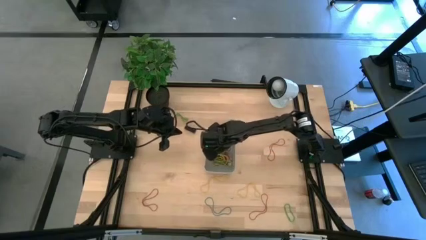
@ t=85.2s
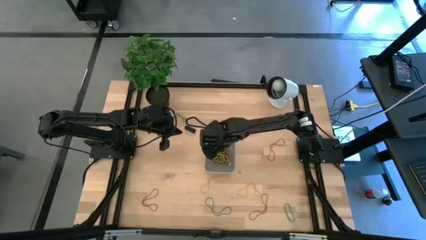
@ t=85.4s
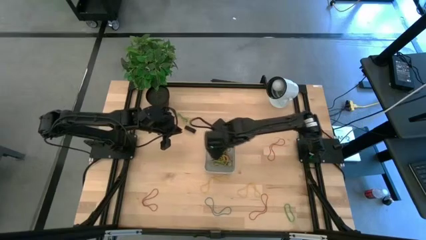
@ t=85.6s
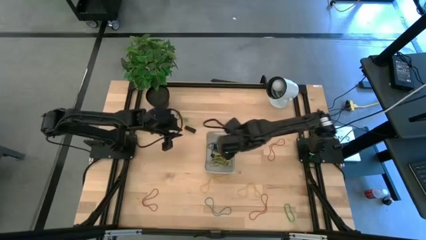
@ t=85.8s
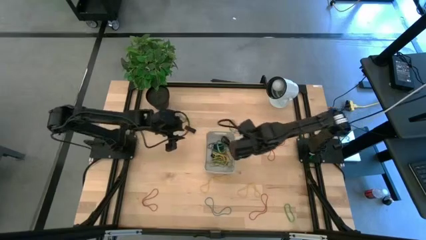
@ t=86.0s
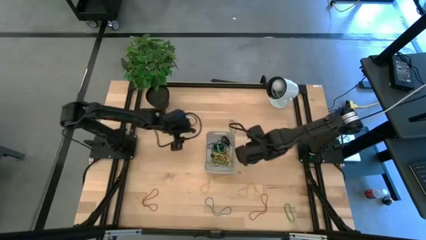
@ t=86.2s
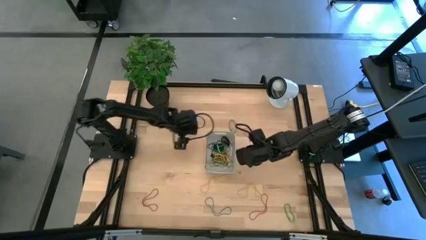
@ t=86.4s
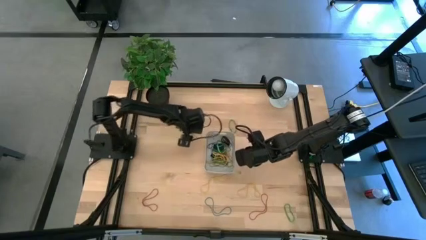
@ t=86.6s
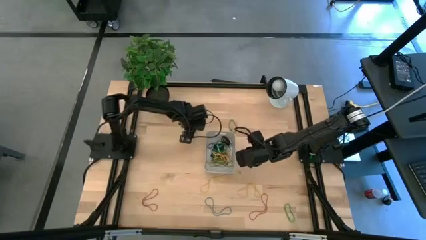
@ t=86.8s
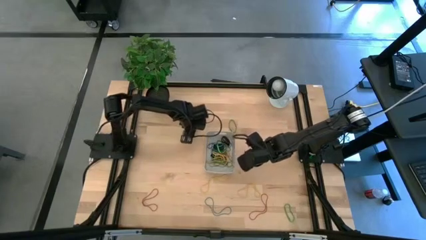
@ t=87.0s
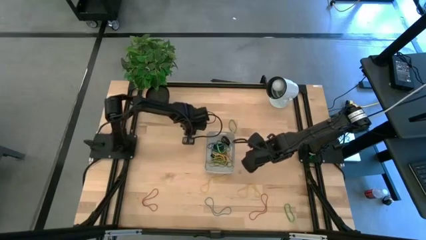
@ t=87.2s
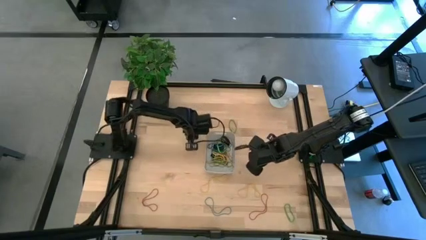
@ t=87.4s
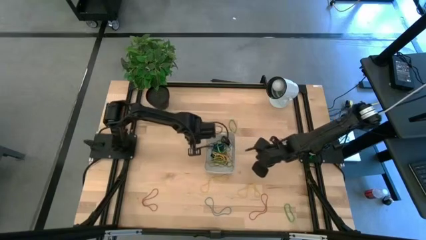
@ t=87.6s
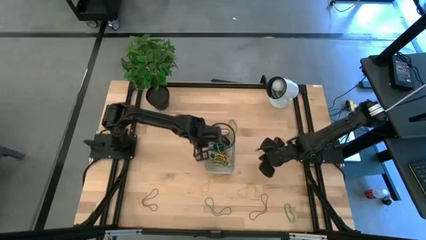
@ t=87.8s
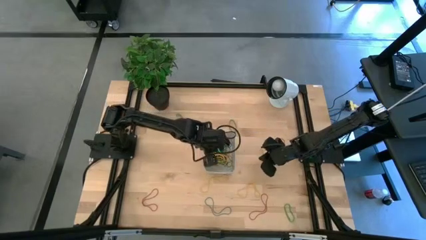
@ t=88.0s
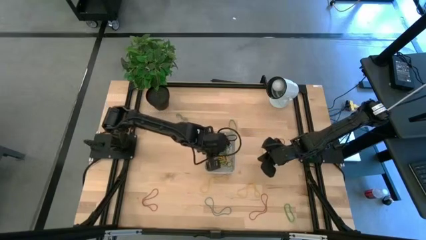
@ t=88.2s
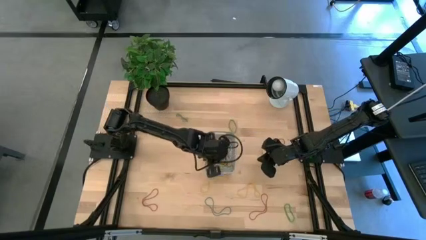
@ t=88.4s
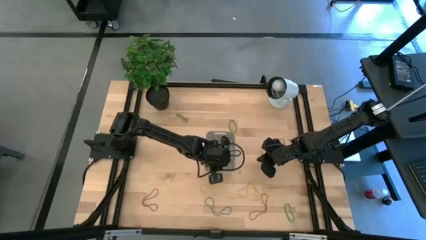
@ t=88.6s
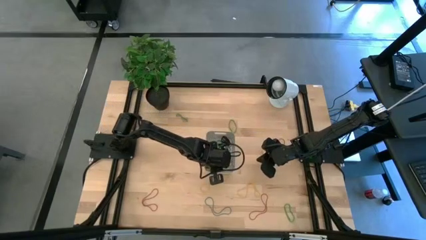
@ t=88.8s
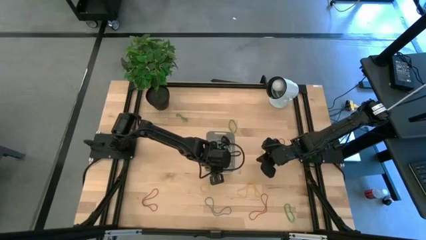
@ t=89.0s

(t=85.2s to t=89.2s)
Task: Pick and place rubber bands into bin
Put the black rubber band into the gray bin

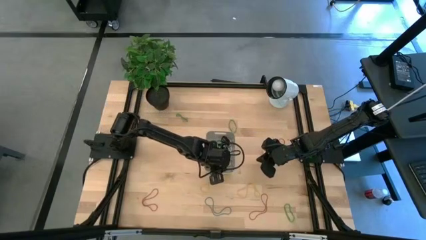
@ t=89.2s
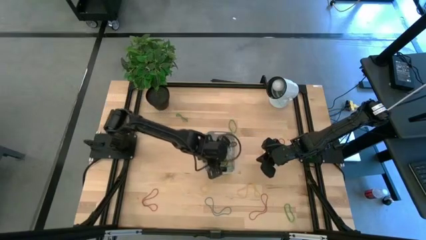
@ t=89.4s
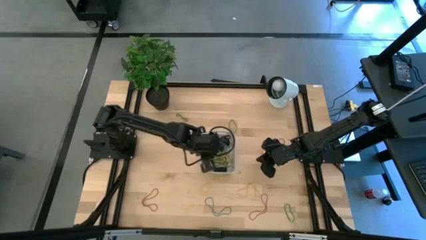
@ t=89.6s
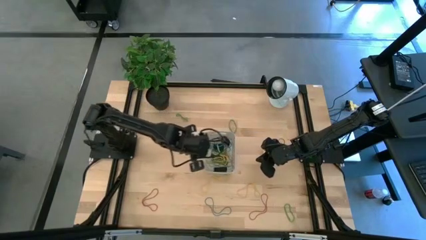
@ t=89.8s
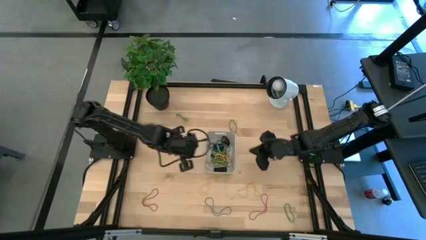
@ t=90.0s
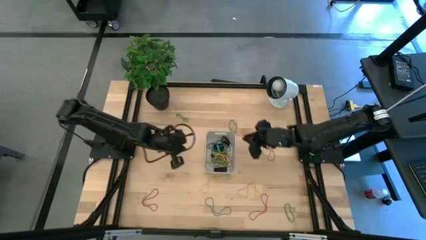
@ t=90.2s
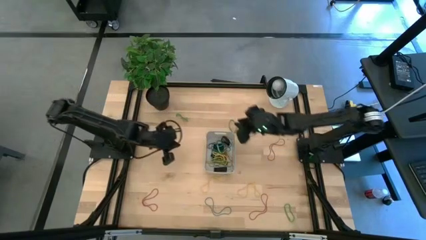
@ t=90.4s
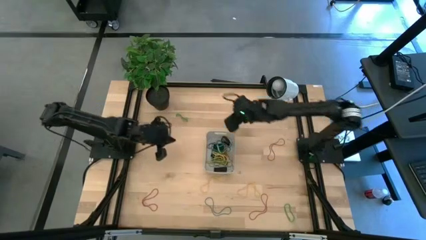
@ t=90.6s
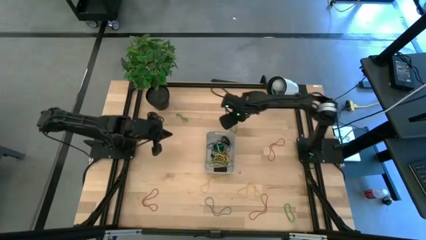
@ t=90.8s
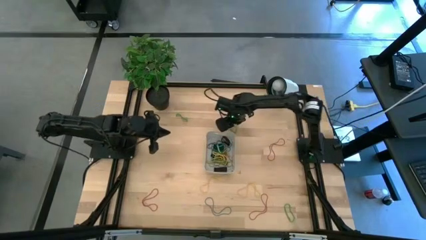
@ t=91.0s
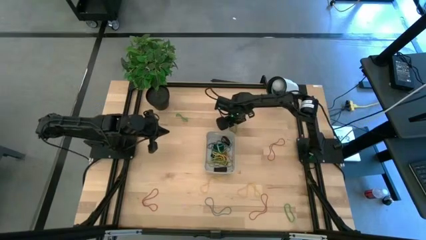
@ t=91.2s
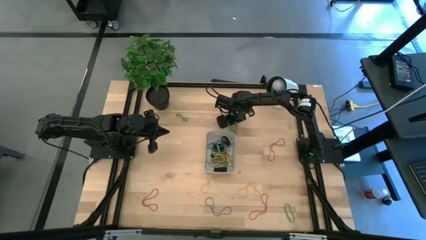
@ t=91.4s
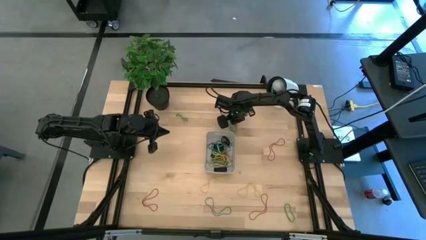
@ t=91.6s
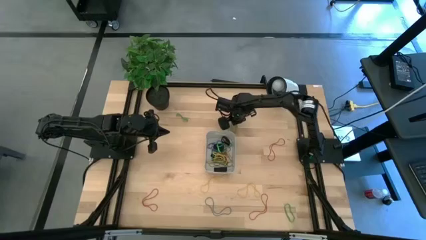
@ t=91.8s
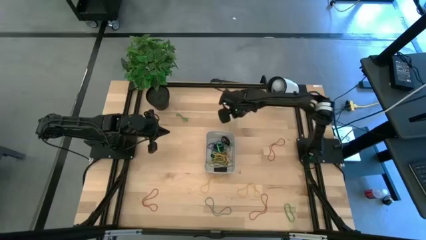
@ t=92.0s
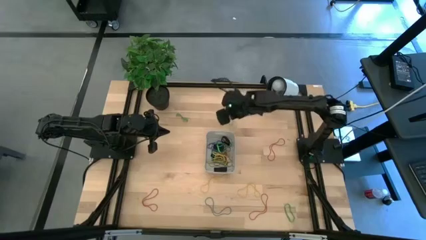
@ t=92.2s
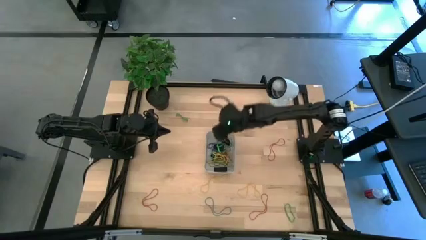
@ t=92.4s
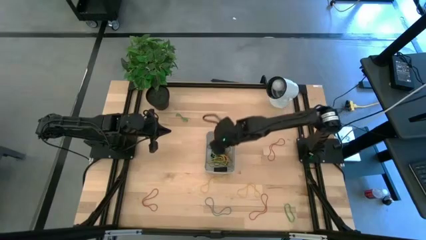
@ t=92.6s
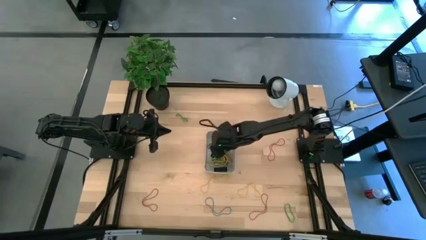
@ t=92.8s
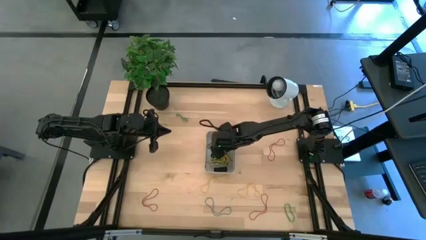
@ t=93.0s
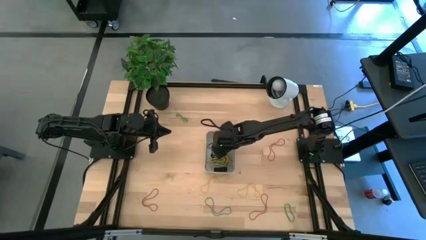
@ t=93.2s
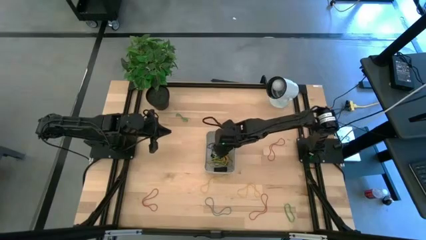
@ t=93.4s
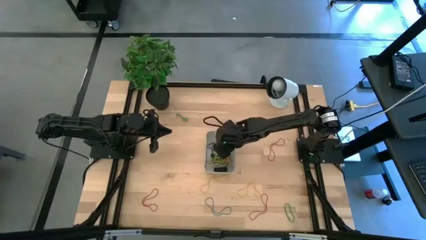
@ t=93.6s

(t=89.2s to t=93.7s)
Put the green rubber band into the gray bin

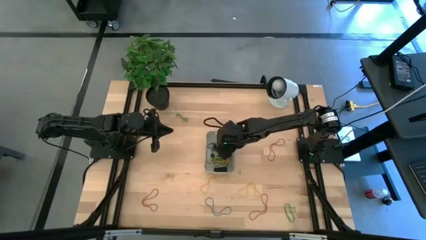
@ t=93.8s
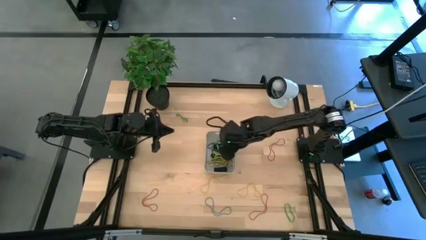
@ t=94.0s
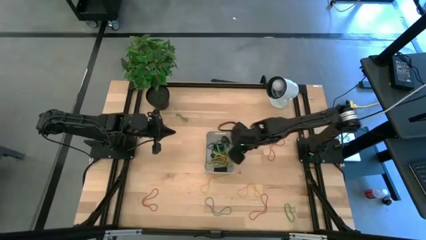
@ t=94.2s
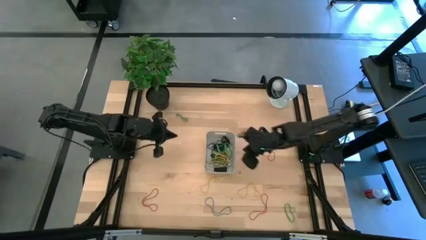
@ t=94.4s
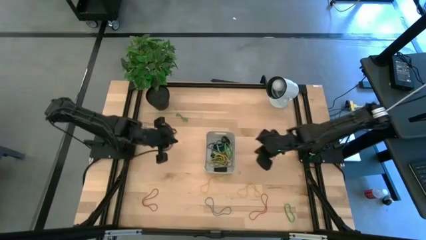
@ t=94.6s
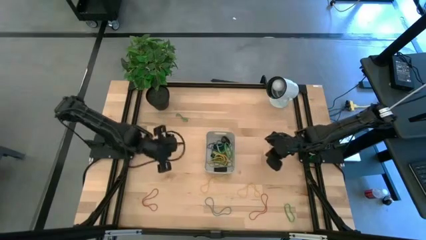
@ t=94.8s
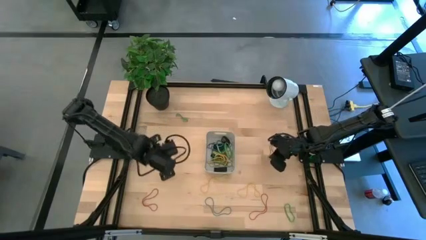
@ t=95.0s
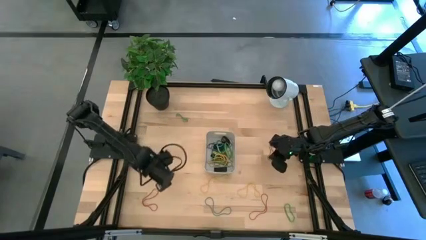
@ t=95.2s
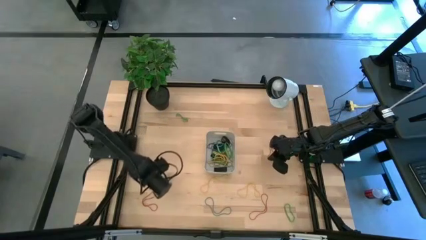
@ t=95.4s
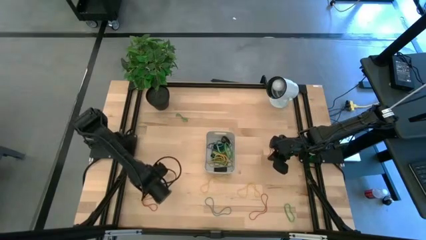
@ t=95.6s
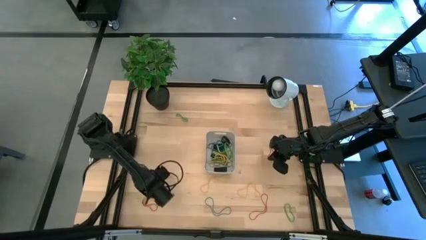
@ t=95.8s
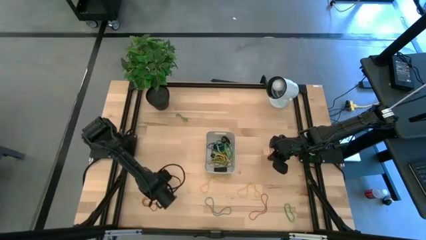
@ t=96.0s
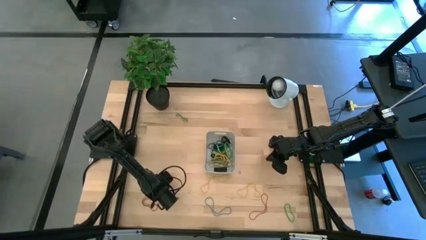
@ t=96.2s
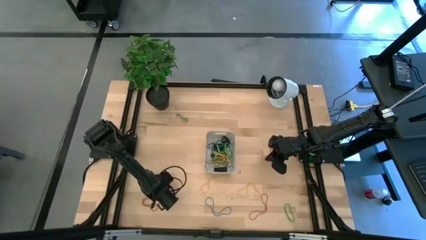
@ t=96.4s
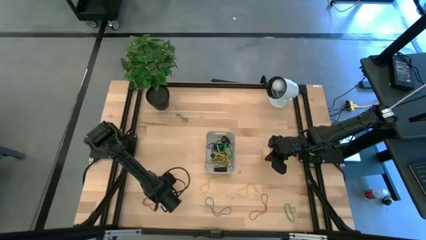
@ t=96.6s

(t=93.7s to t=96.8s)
Put the red rubber band into the gray bin

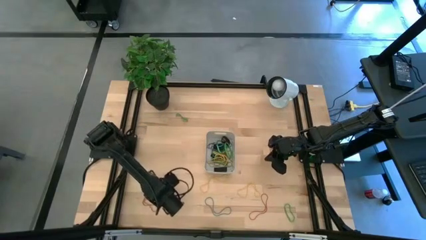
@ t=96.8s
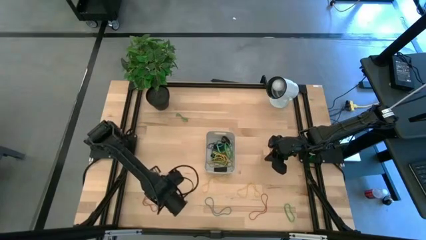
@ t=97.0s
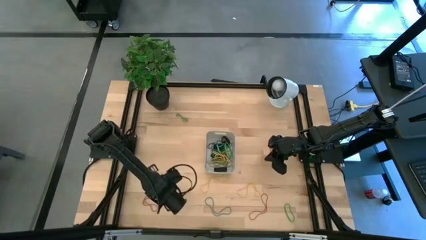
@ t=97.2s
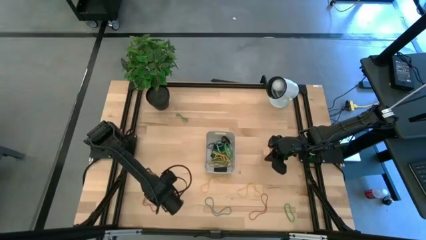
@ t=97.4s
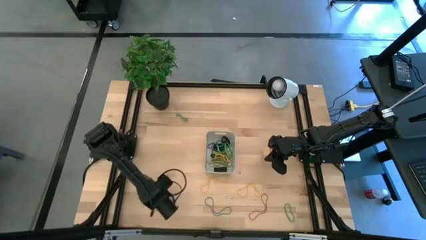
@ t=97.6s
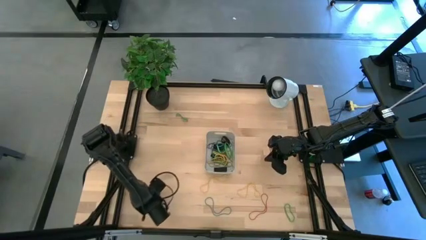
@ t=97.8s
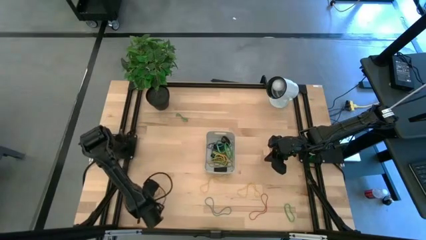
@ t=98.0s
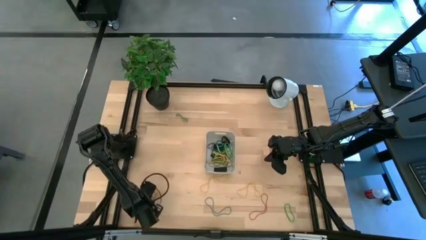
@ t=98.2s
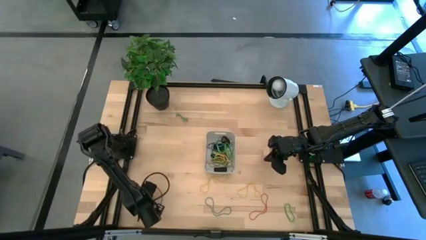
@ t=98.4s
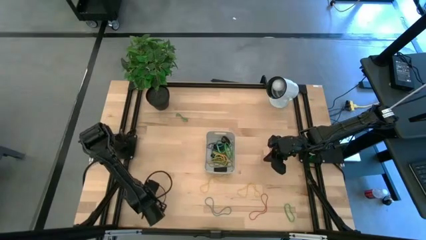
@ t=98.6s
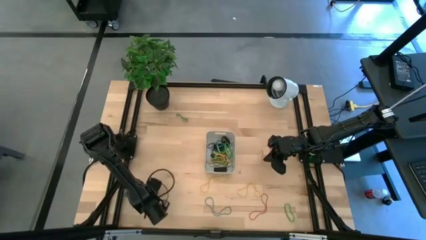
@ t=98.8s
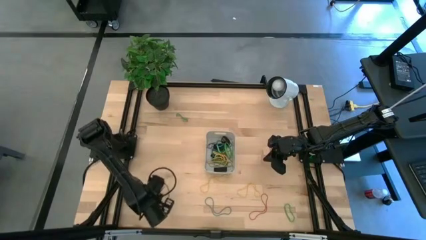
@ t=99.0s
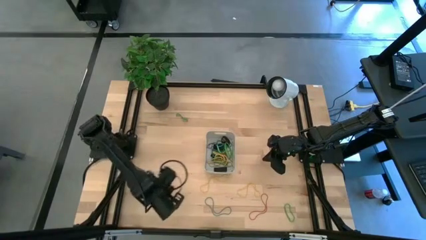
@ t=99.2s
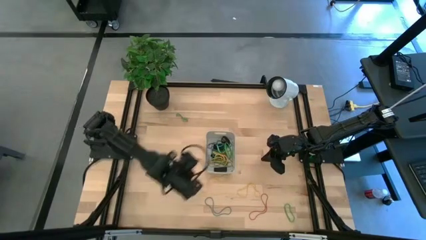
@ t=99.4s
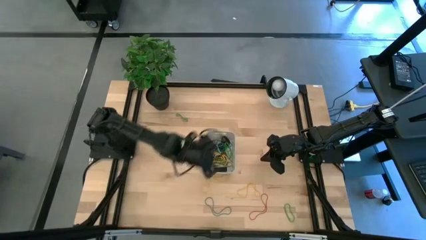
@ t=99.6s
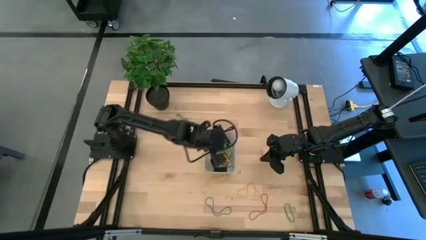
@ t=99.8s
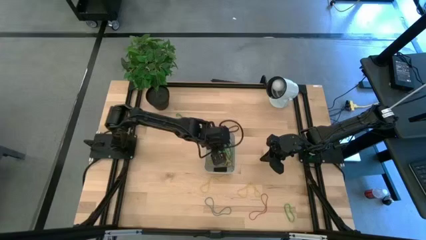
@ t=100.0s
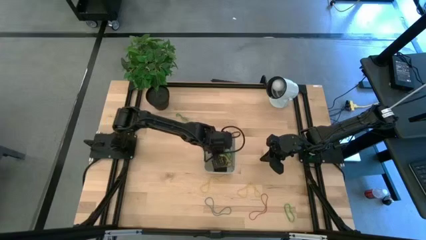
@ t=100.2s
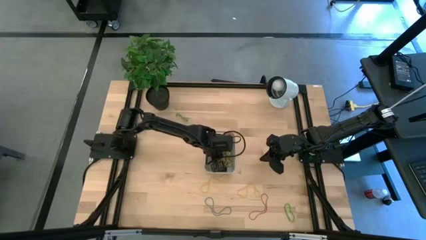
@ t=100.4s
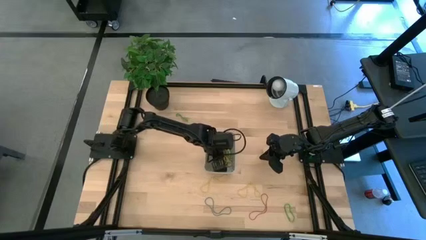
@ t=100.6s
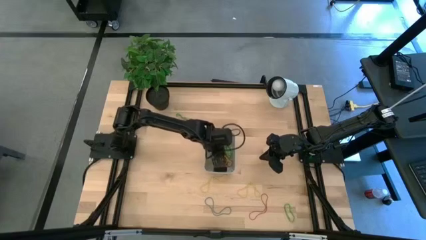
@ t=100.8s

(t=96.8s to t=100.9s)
Put the red rubber band into the gray bin

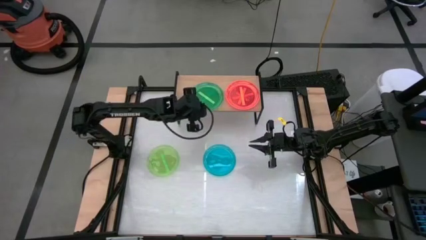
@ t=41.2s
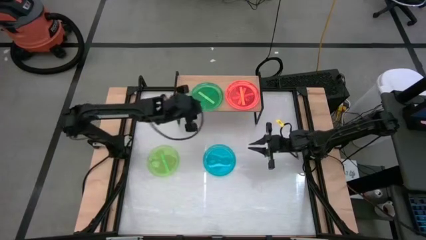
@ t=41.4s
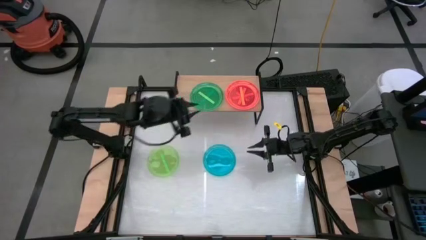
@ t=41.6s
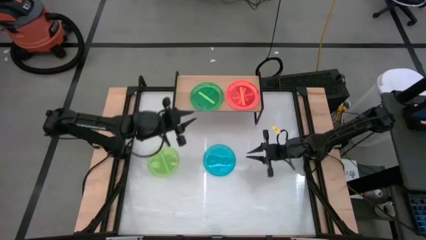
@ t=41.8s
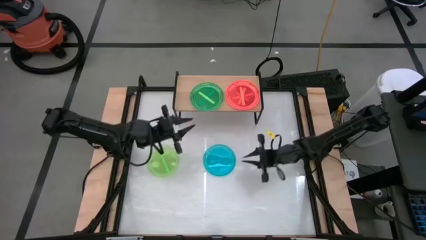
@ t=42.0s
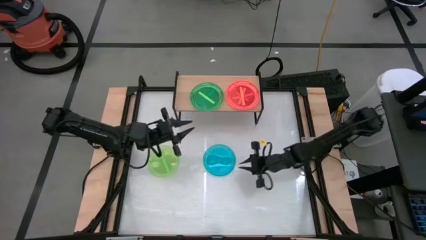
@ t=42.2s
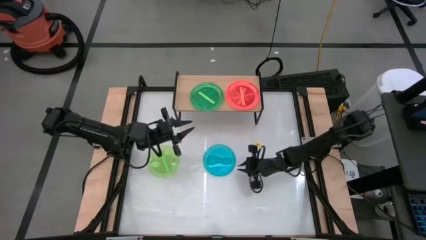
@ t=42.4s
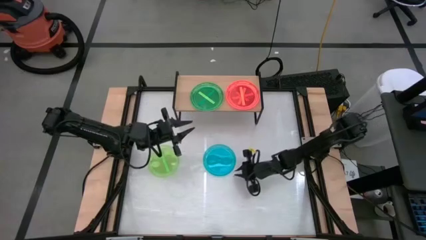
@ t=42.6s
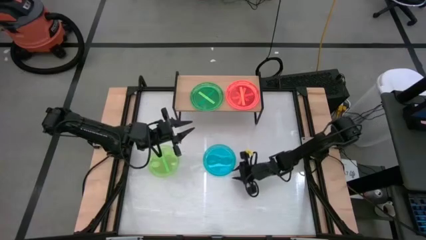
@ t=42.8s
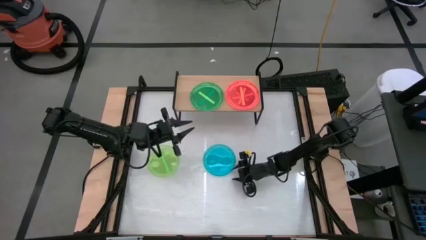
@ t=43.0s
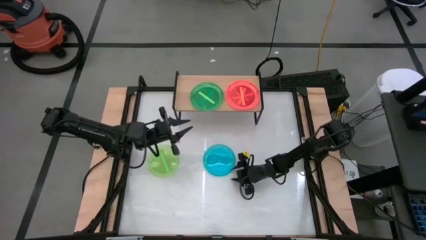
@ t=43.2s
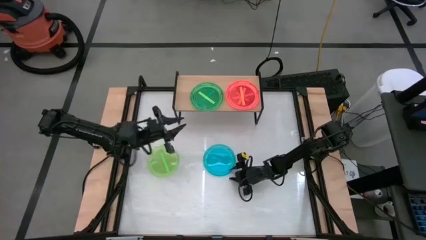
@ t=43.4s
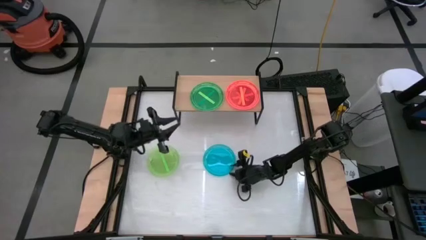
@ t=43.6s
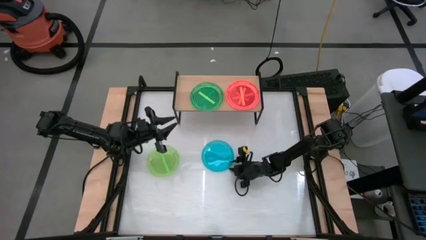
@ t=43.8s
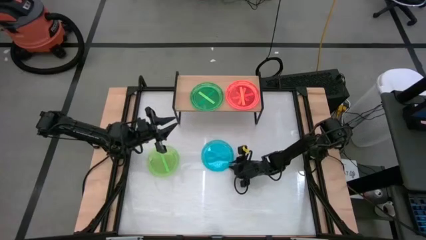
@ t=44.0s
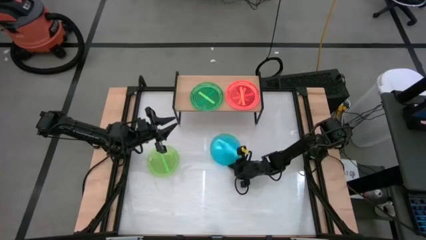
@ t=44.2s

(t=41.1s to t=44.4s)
Task: Place and stack plates onto a shelf
Stack the blue plate on top of the green plate on the shelf
